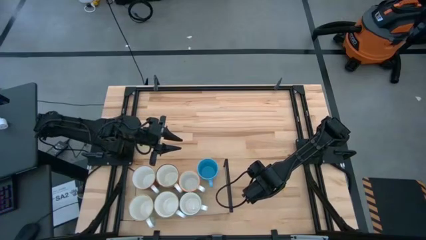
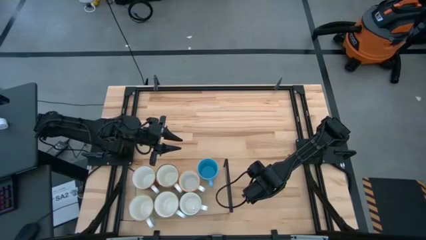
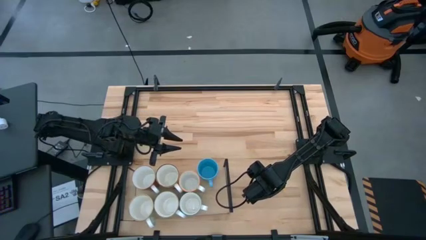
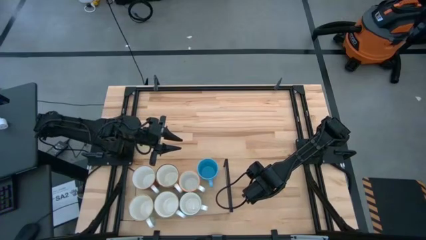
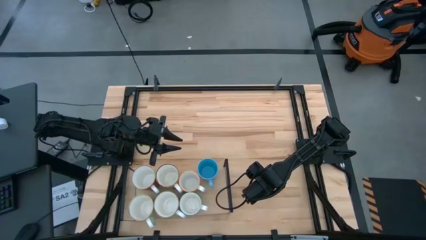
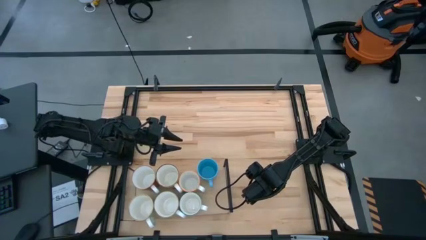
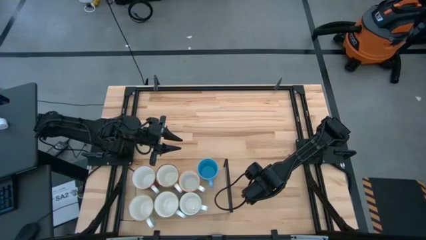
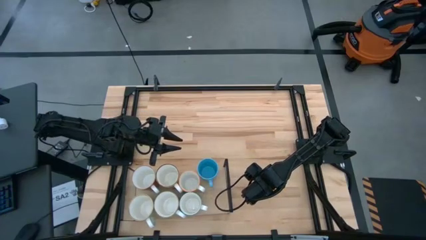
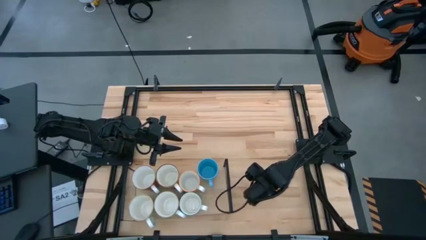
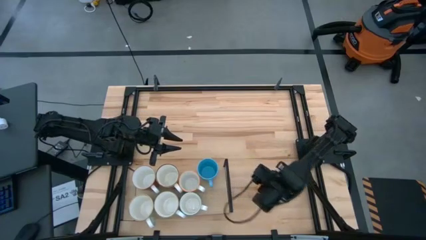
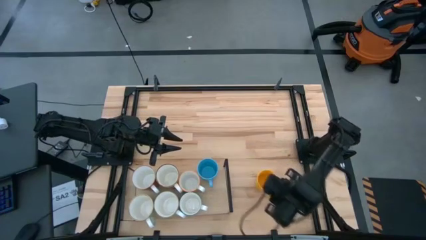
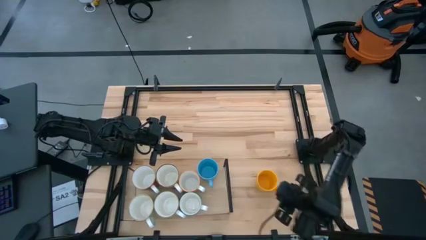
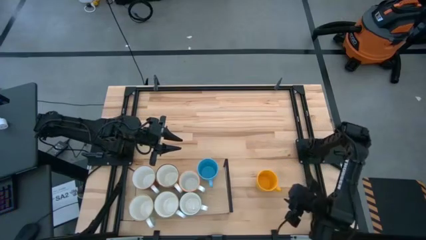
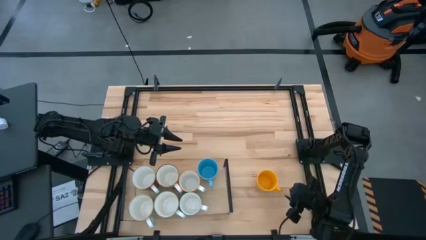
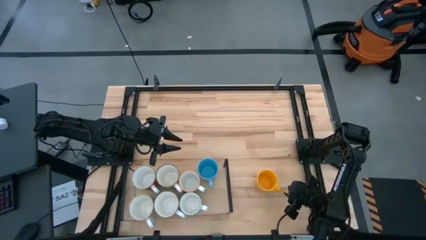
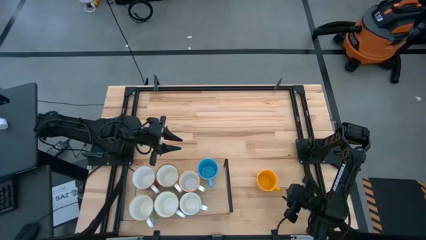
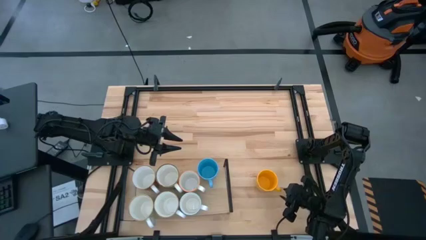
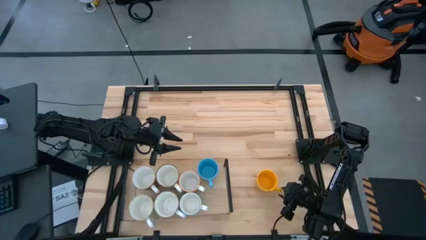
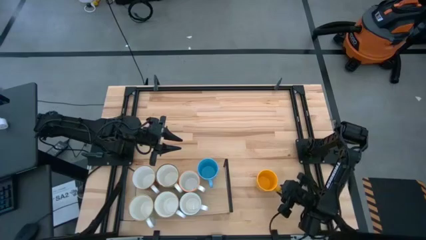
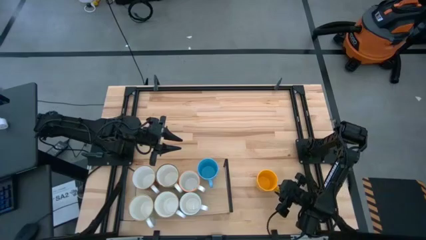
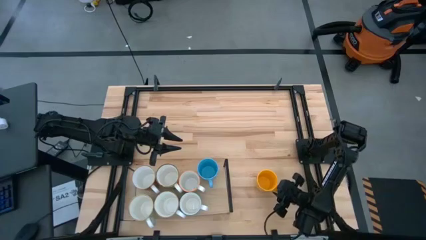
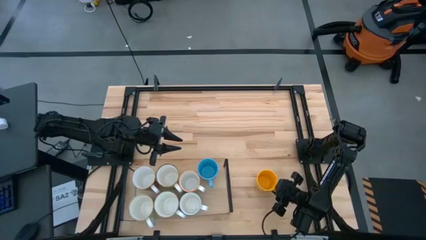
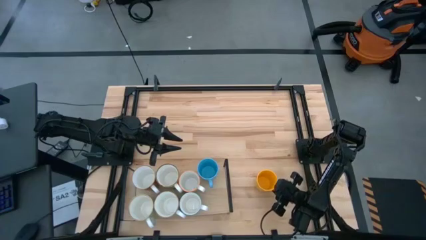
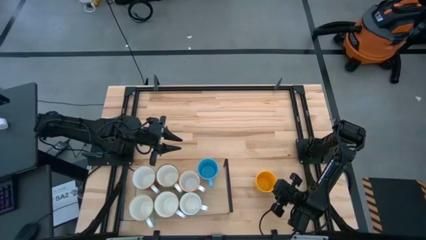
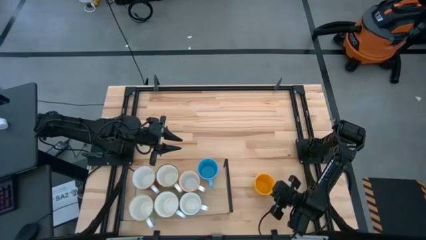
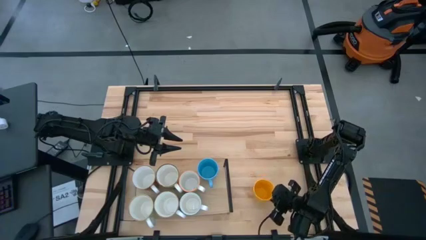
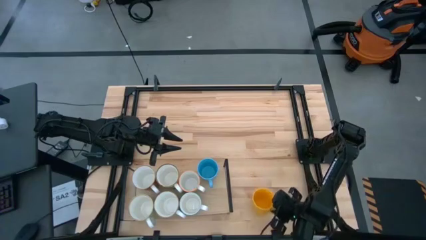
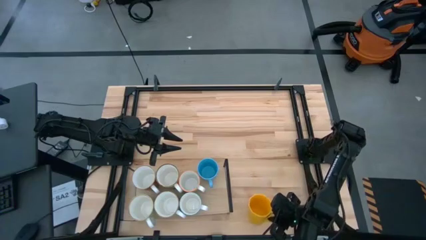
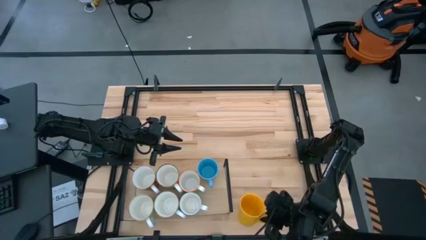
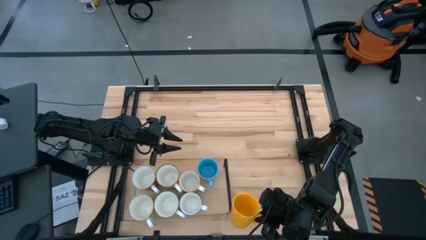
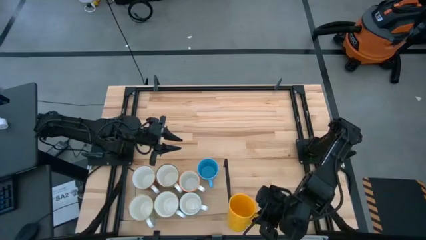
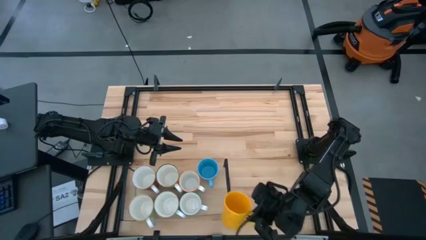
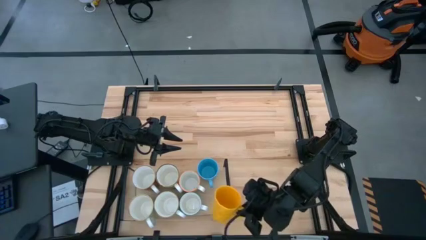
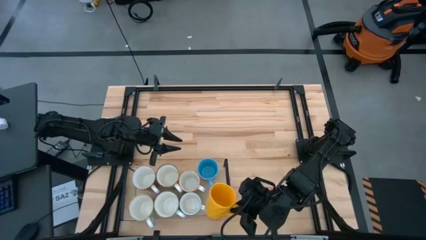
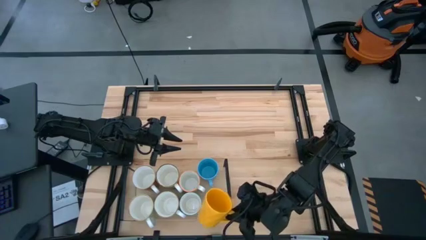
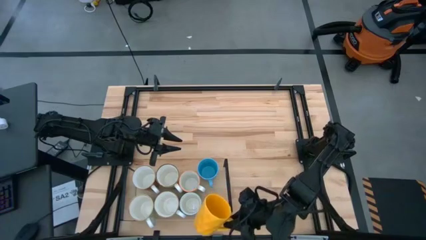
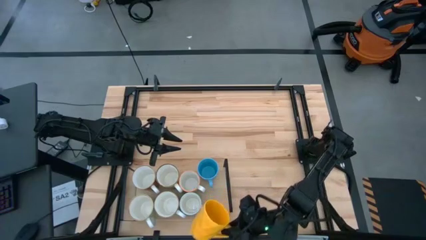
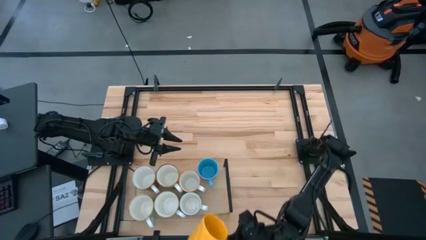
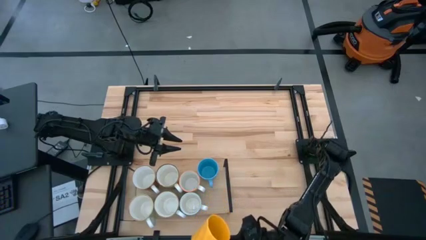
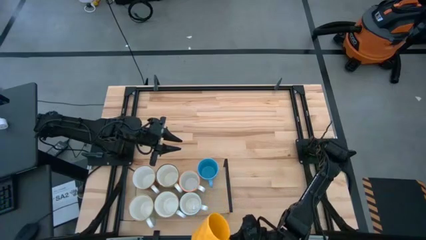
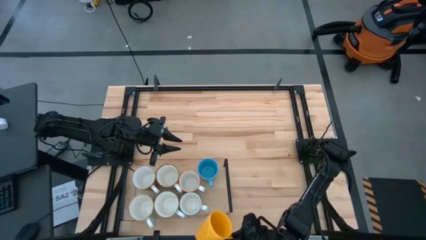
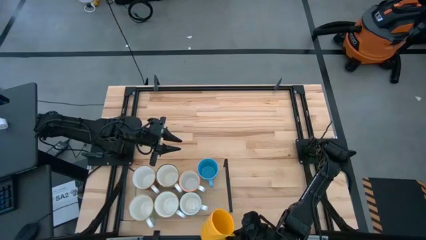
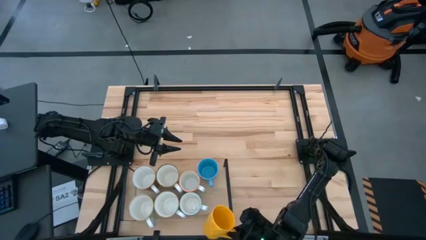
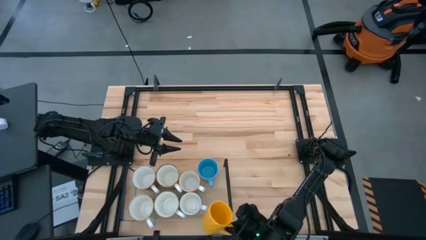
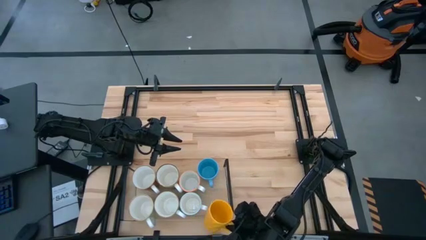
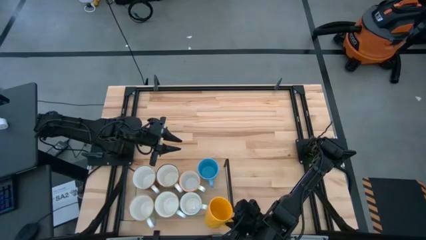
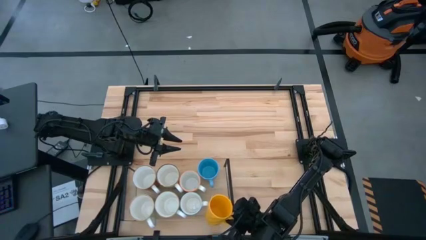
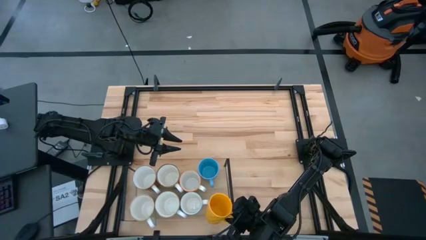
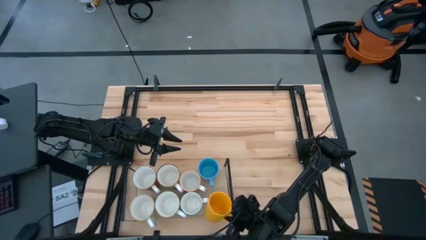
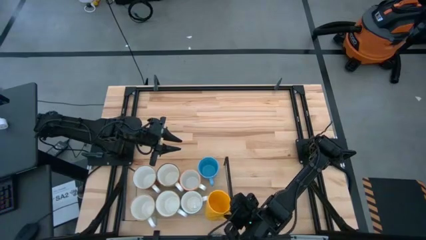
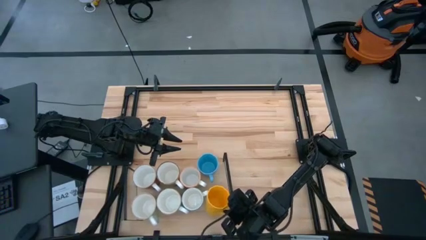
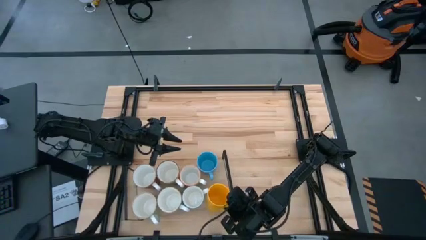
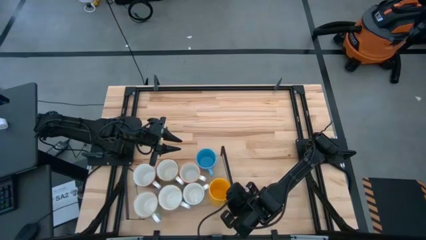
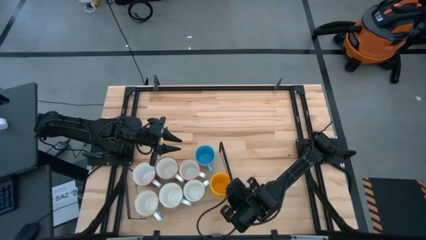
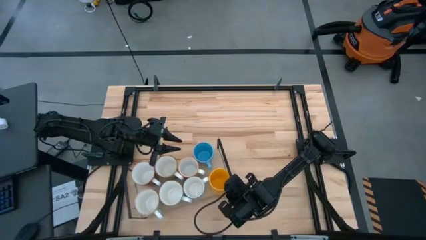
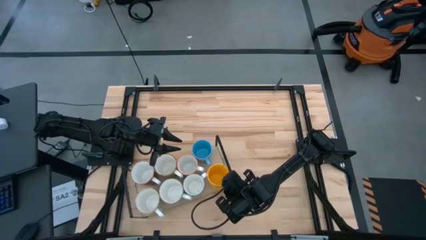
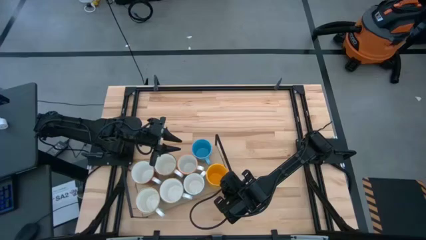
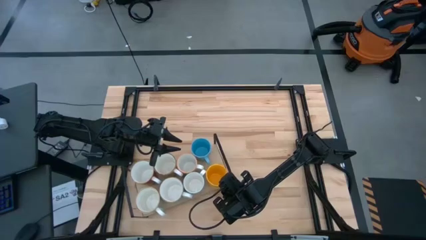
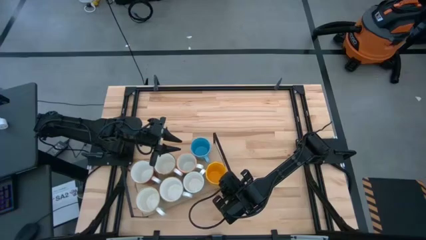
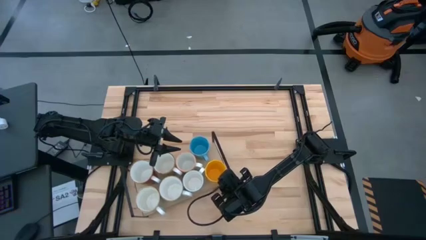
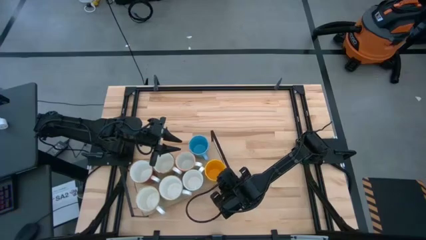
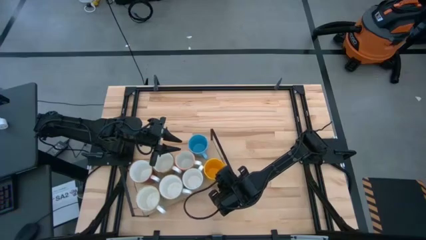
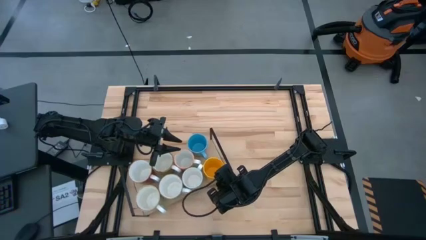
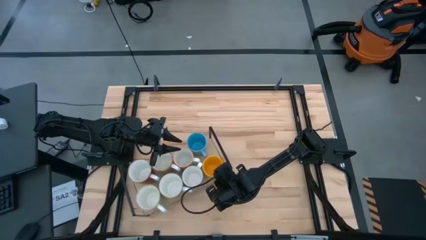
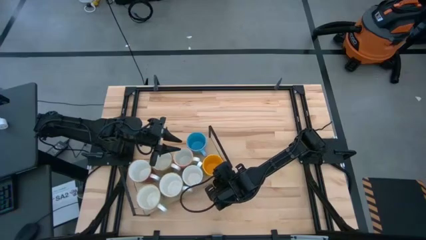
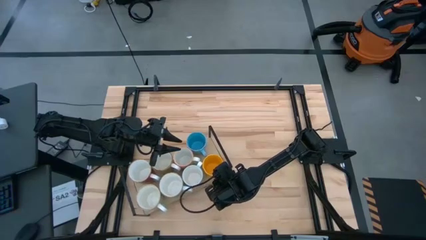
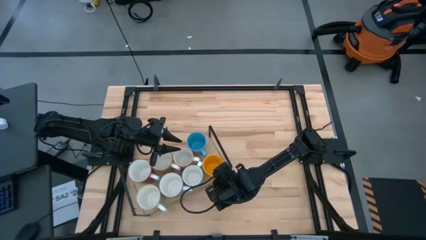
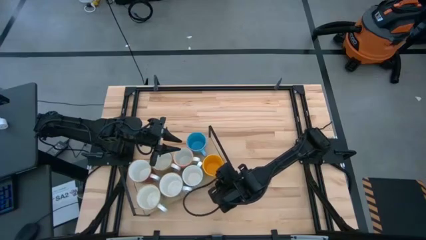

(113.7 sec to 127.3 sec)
Task: Place coffee mugs
Put the yellow mug on the shelf

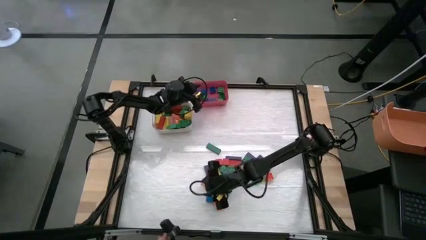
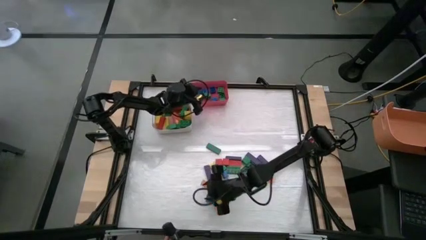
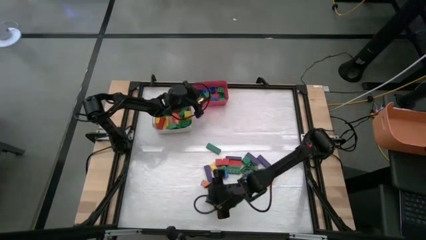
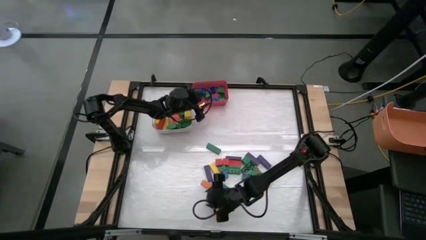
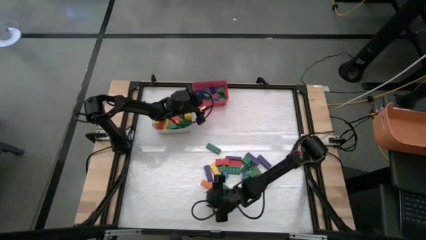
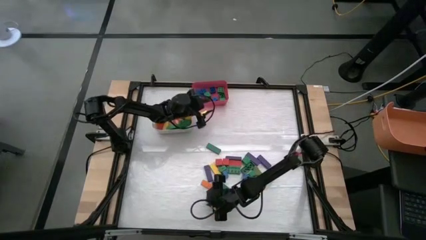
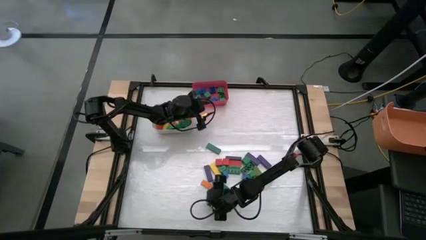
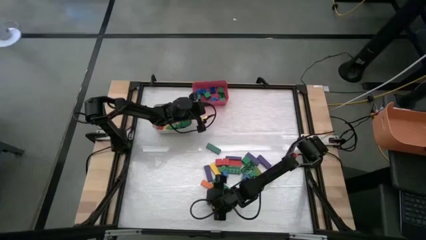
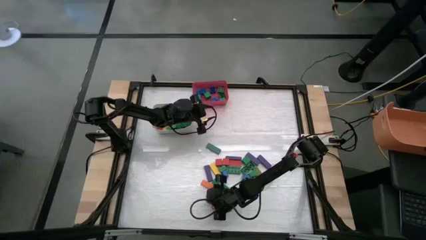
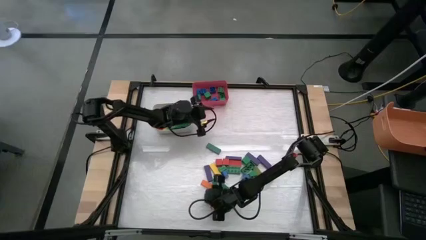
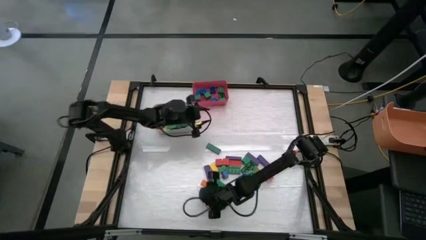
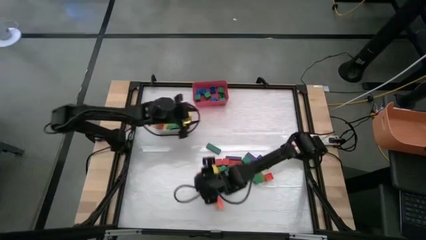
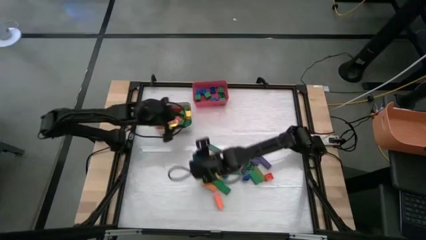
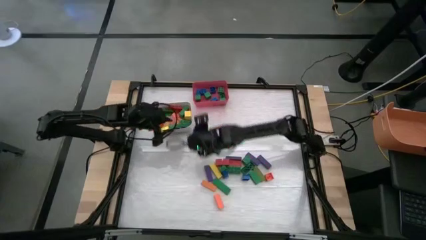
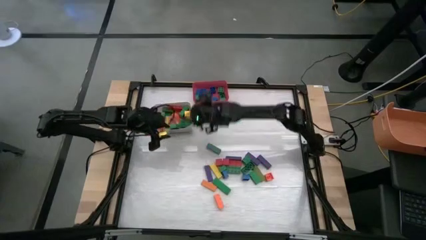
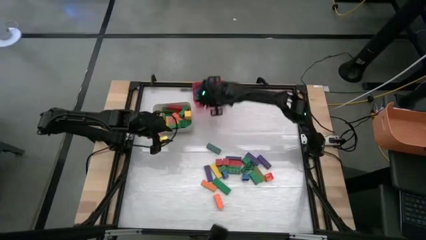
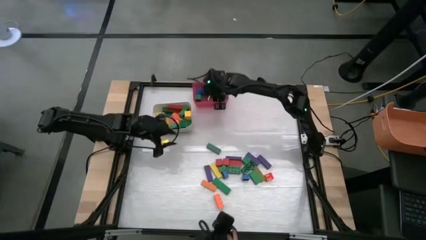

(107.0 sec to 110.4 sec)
Task: Sort blocks by size
Put the small blue wooden block into the red bin
